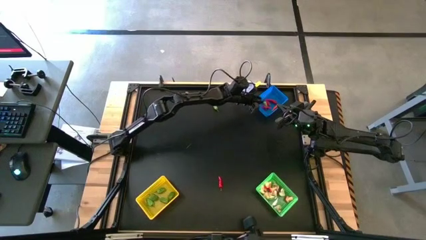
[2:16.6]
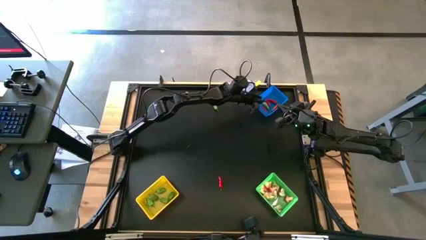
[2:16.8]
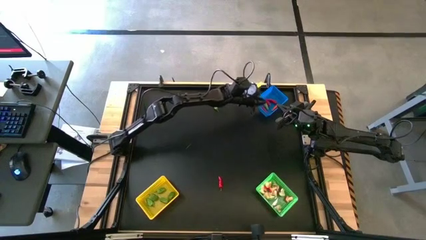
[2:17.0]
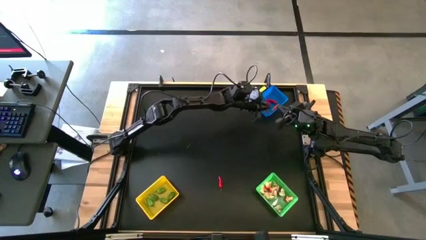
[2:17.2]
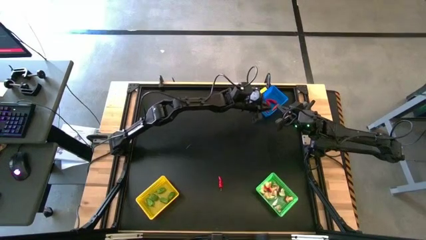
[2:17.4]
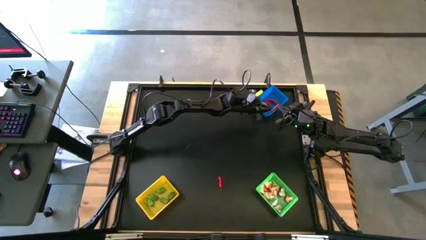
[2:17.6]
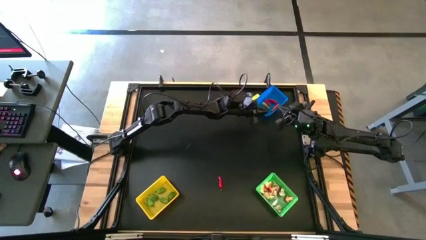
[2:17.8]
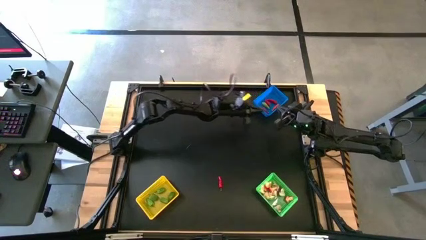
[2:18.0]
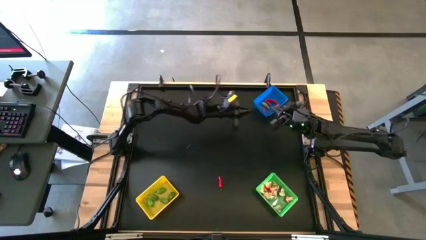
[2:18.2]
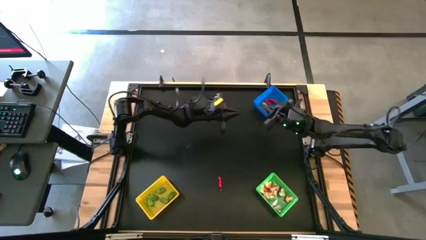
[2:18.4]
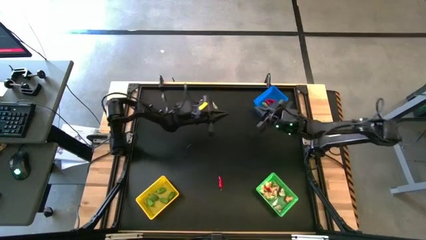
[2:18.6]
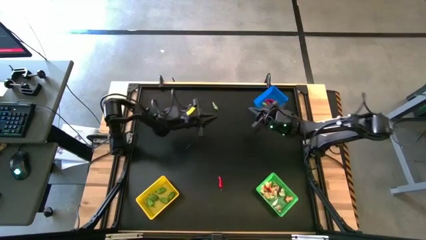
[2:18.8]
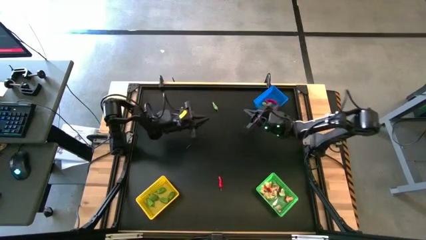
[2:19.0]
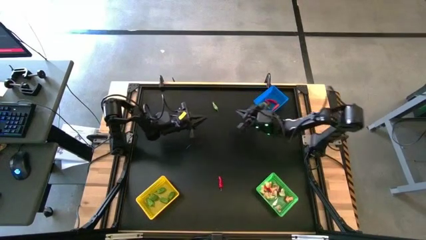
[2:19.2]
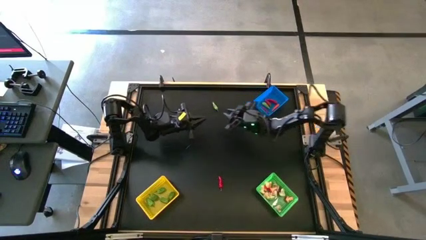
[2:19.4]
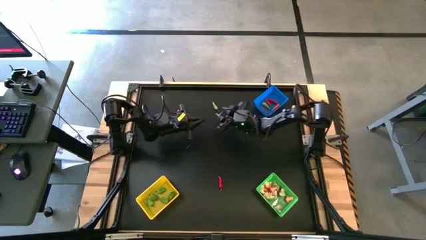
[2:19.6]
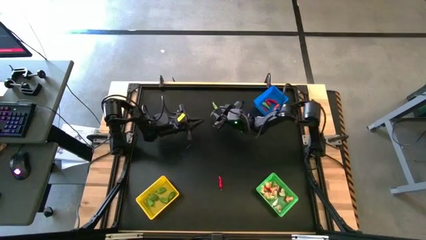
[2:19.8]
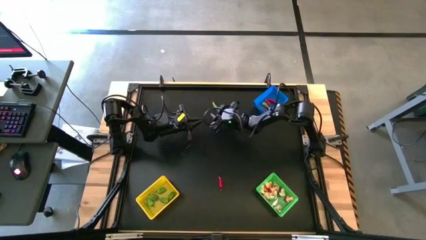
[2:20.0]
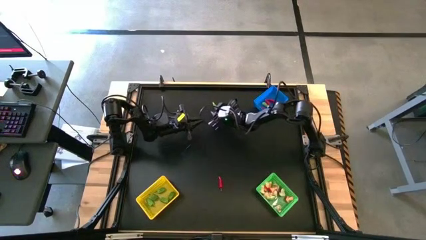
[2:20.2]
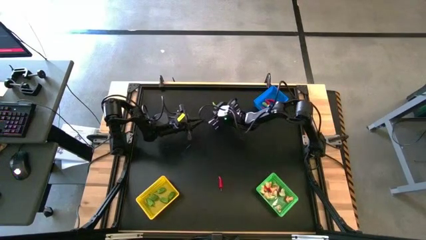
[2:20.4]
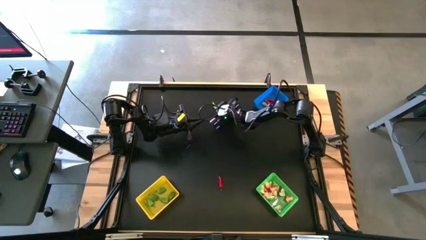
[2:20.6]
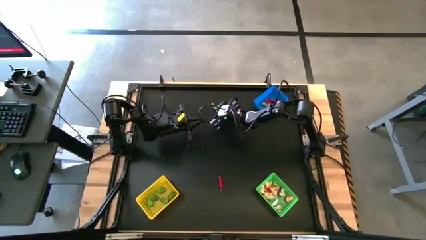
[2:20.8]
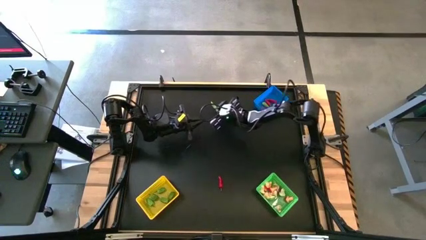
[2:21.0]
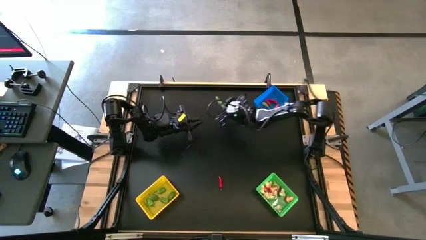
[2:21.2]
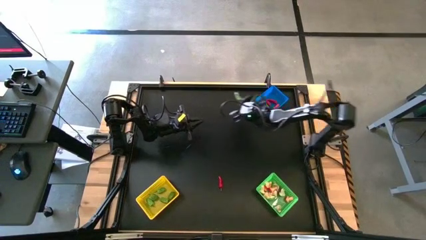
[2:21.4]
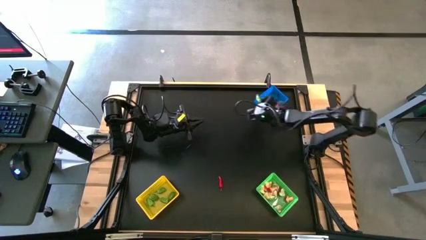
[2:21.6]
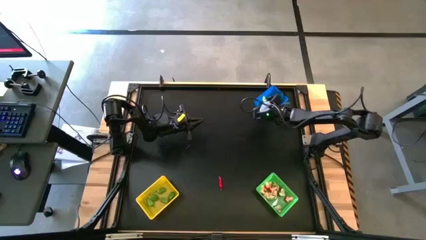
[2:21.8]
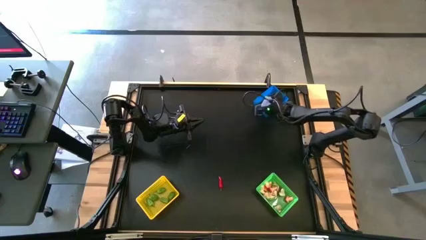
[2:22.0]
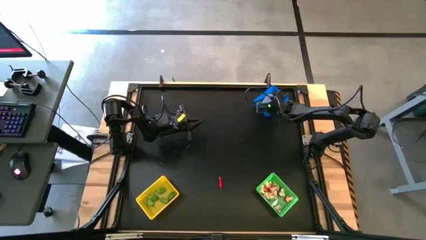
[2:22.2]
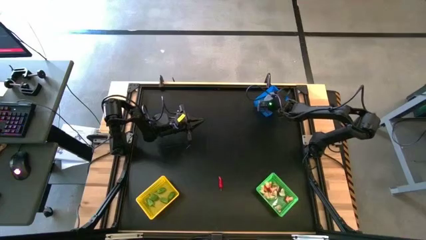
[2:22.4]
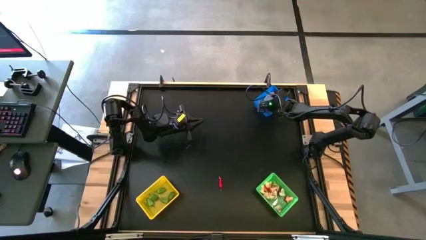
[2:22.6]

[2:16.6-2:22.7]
Task: Sort produce into baskets
Put the chili pepper into the blue bin

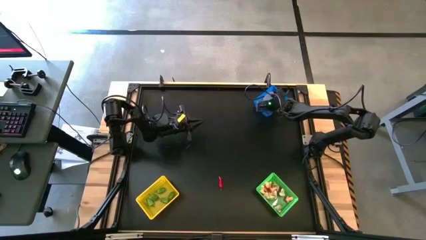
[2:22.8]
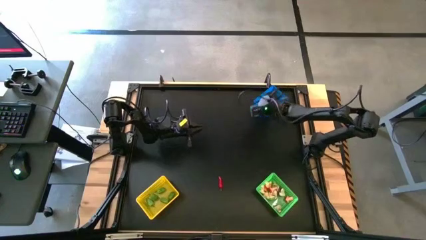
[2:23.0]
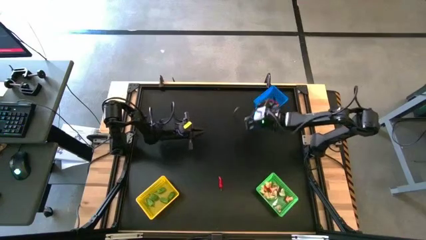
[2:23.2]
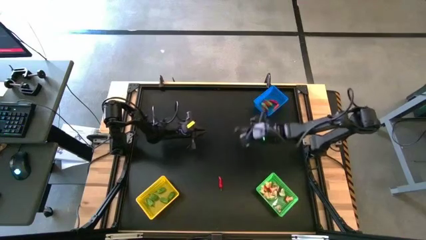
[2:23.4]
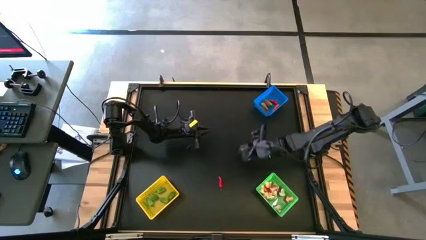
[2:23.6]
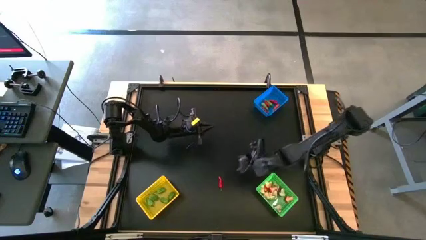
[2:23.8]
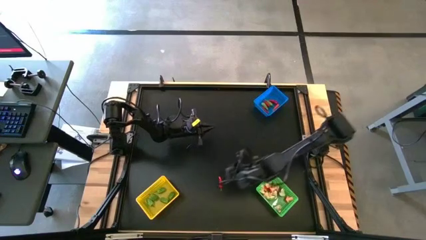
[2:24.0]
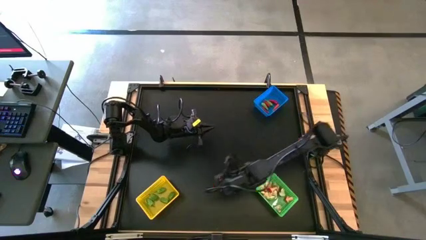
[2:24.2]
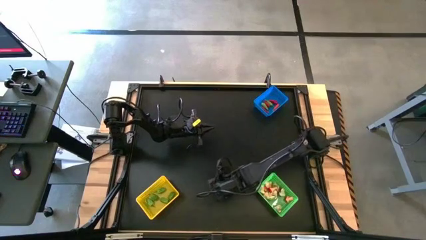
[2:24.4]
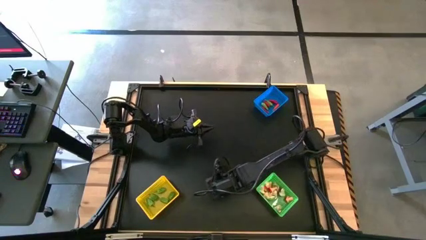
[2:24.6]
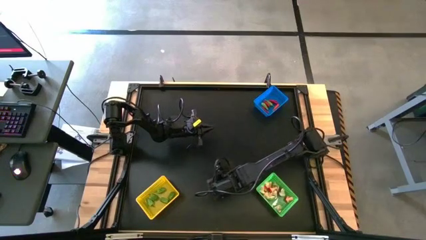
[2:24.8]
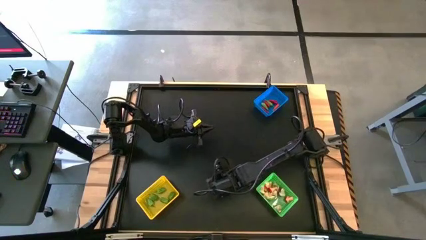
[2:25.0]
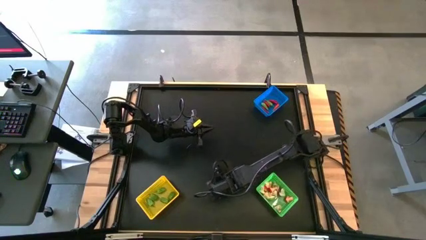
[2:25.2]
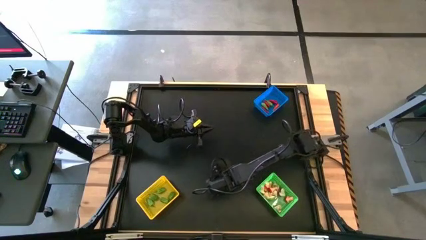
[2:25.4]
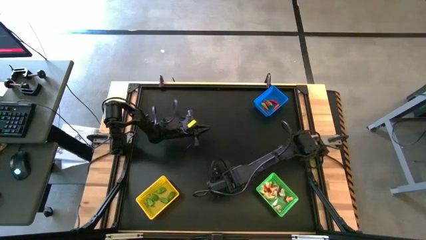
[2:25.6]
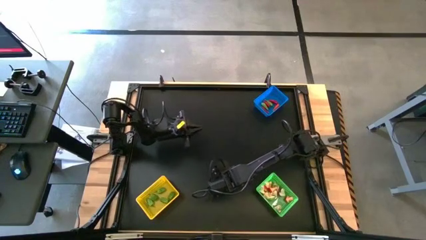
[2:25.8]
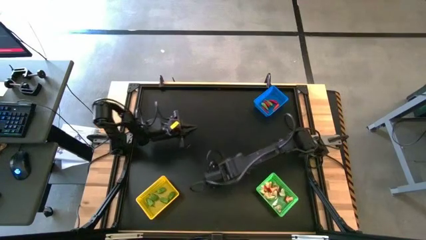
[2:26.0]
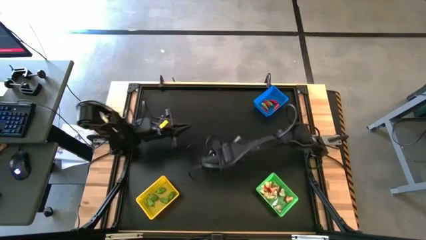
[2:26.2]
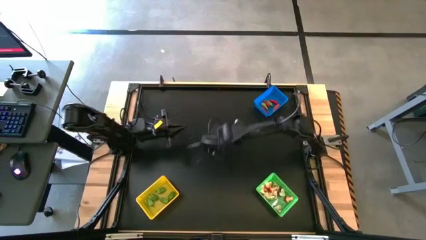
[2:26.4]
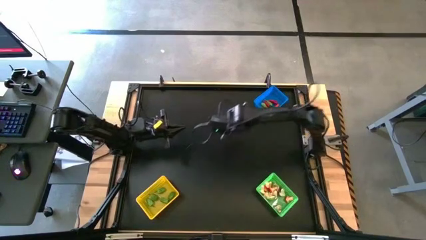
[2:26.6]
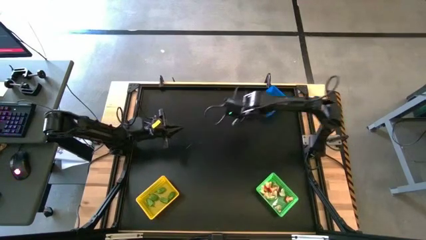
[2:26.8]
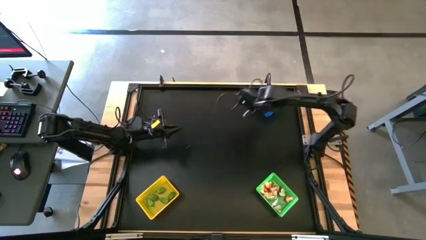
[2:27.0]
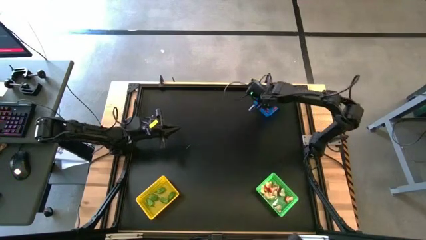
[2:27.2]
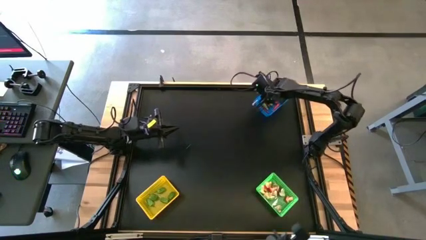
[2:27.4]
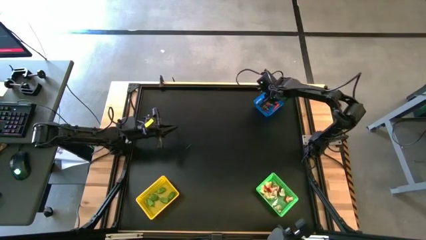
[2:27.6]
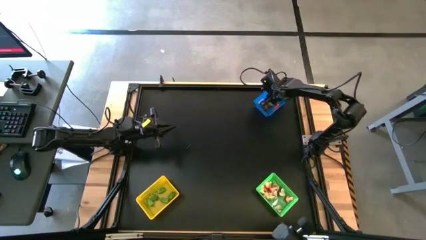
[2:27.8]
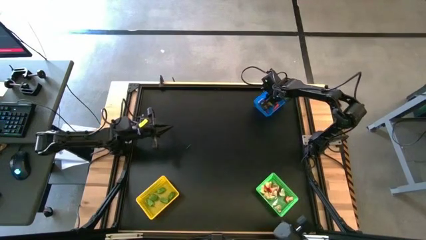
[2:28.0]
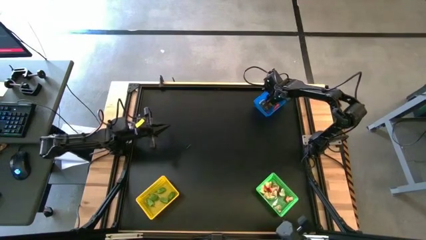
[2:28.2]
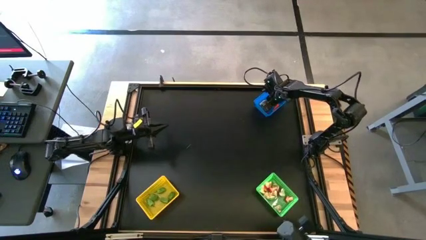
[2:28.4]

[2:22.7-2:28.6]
Put the chili pepper into the blue bin

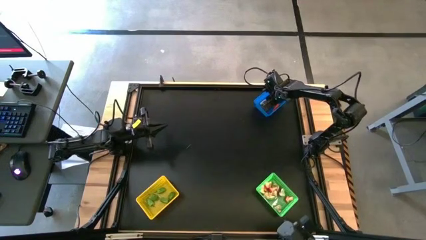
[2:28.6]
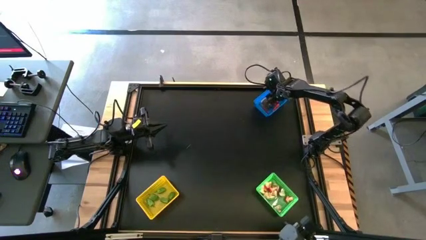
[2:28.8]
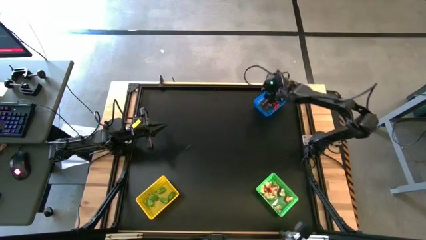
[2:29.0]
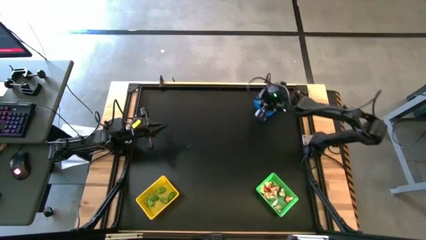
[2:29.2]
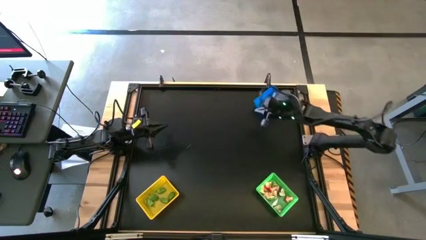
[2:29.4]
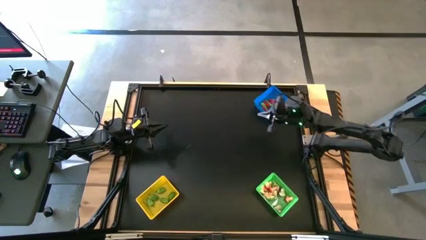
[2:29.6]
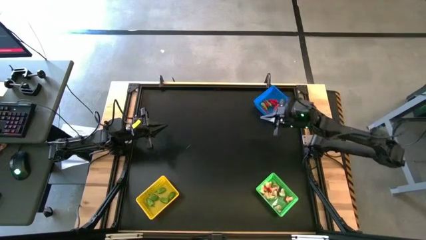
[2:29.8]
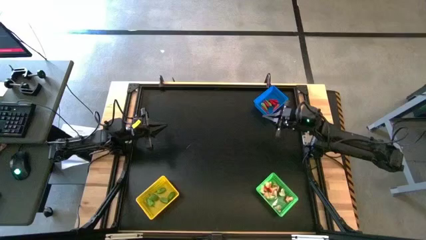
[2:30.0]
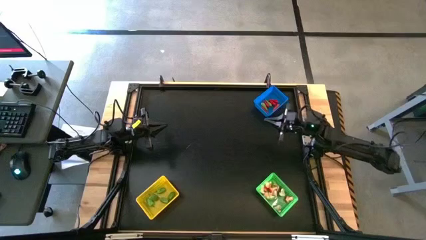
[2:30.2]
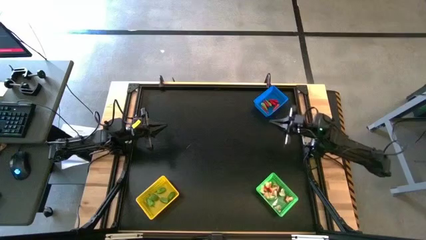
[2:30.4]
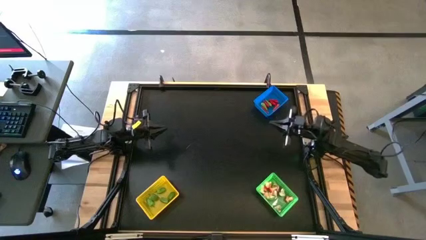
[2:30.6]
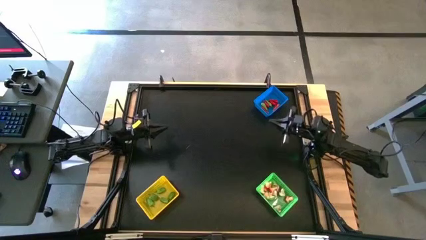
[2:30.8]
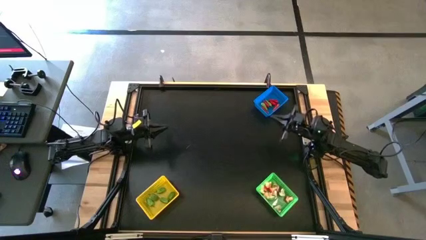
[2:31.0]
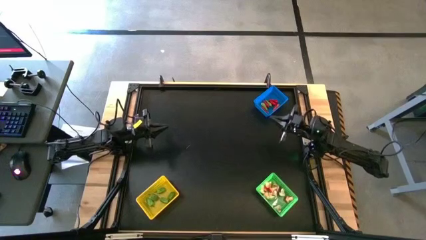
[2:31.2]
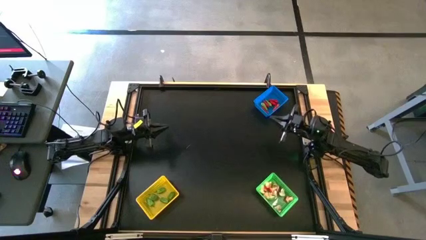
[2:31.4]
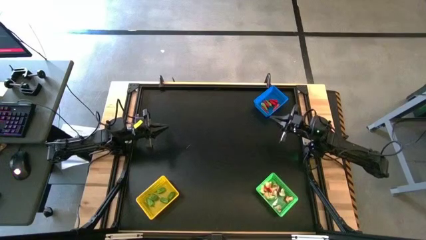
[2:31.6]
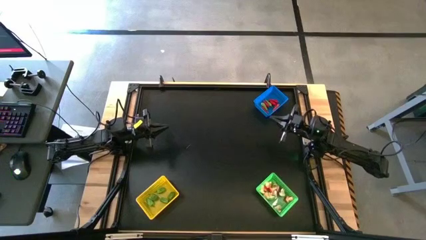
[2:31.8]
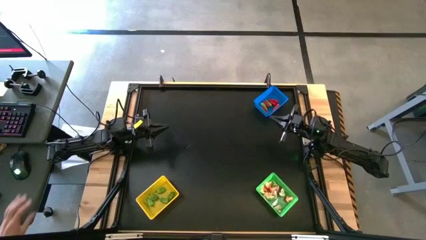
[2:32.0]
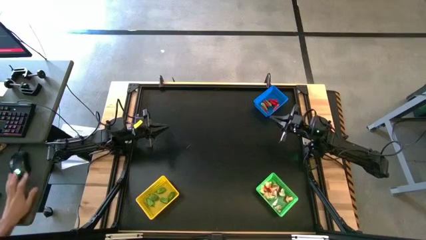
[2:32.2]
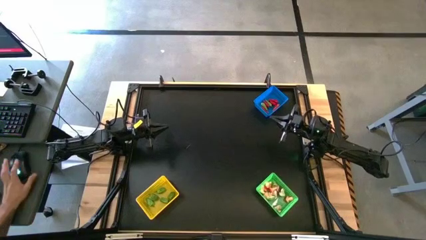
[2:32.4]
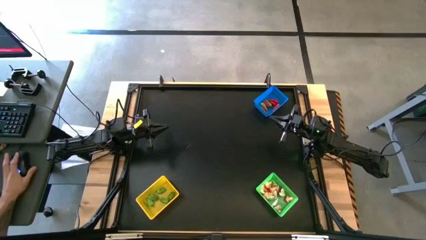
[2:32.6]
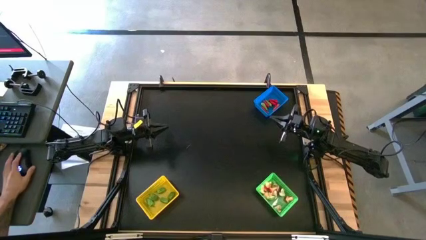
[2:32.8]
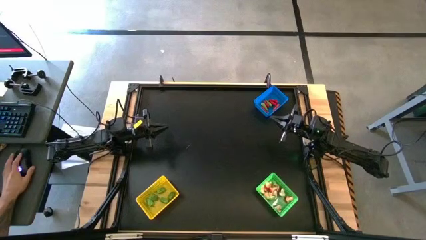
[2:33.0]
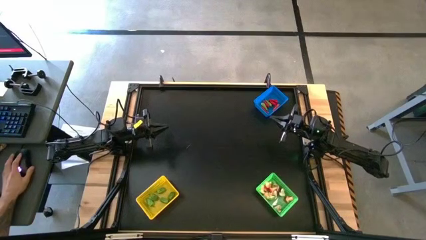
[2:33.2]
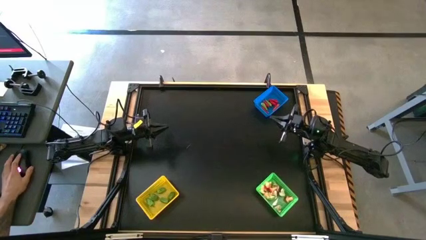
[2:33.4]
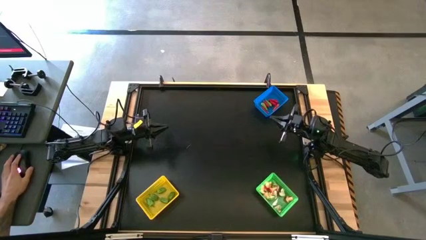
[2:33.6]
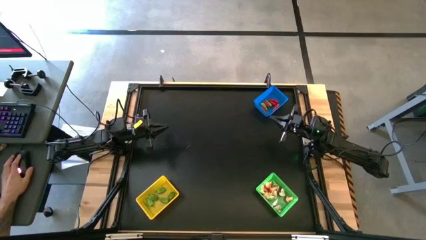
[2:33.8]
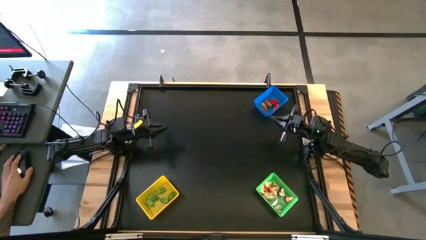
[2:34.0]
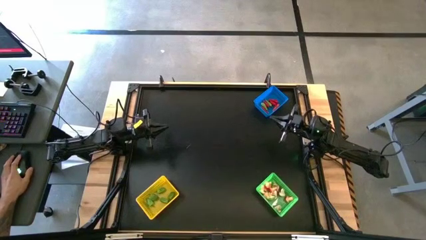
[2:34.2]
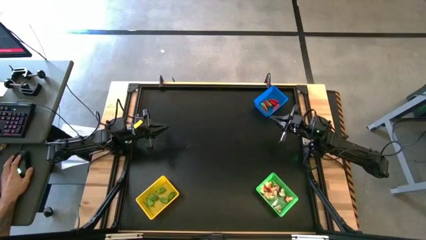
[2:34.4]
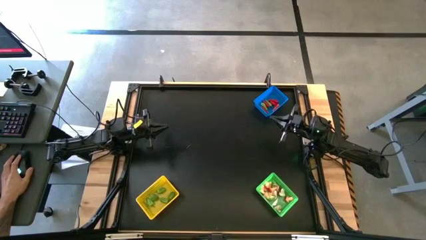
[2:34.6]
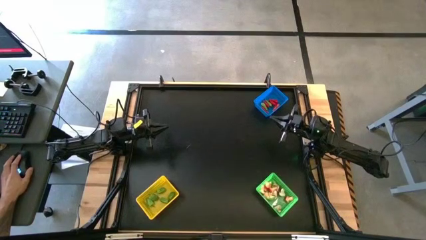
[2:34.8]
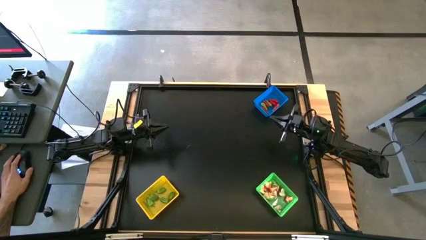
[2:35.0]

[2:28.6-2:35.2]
Return to Home Position
